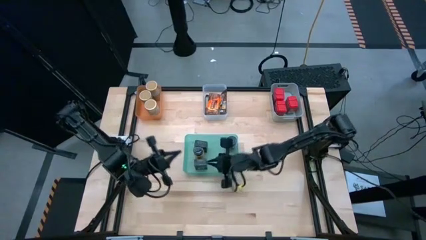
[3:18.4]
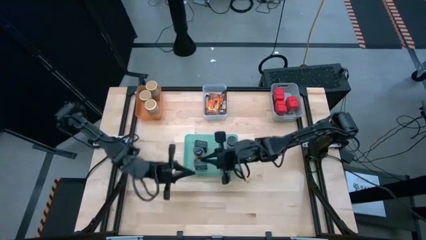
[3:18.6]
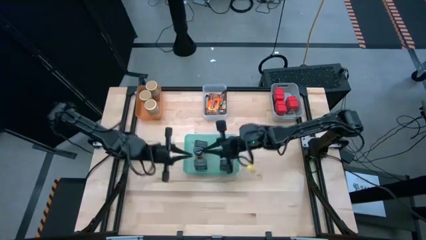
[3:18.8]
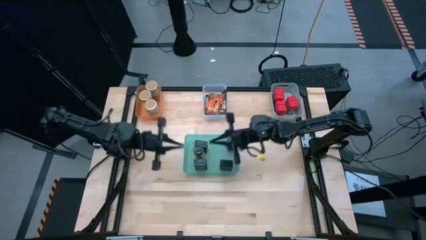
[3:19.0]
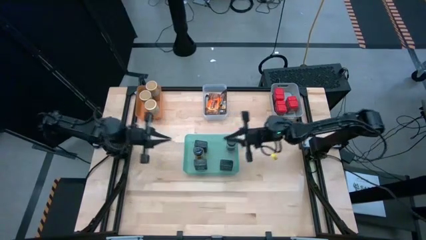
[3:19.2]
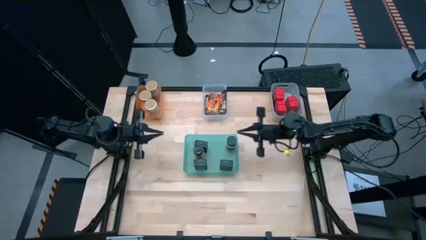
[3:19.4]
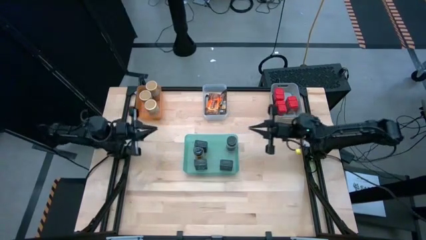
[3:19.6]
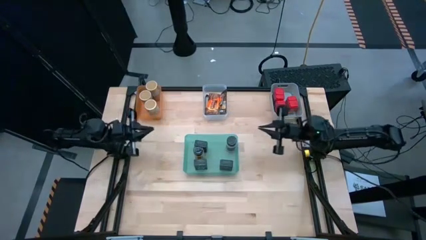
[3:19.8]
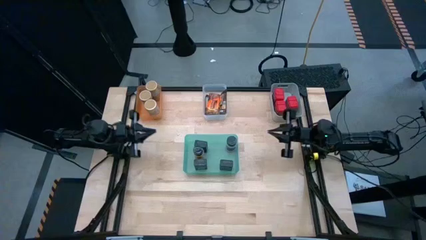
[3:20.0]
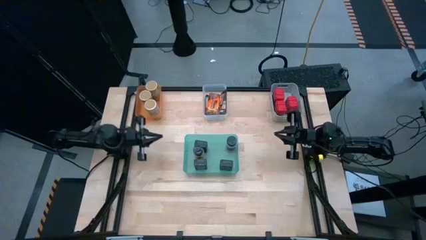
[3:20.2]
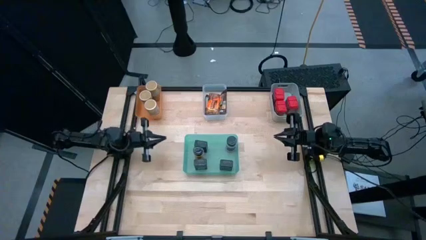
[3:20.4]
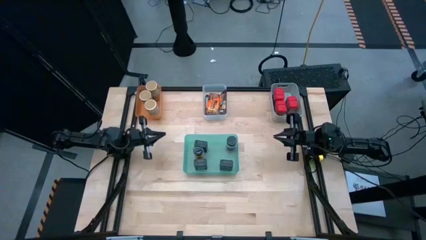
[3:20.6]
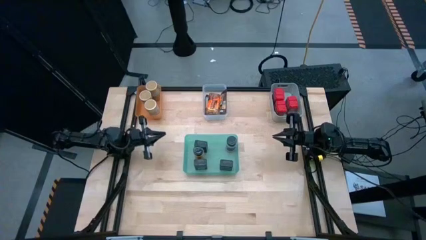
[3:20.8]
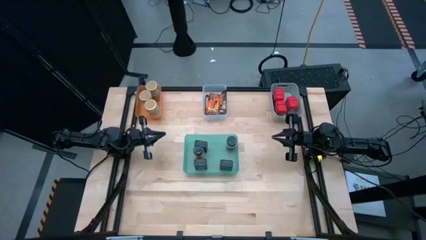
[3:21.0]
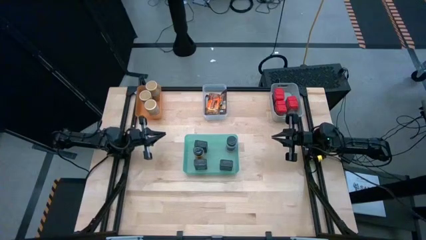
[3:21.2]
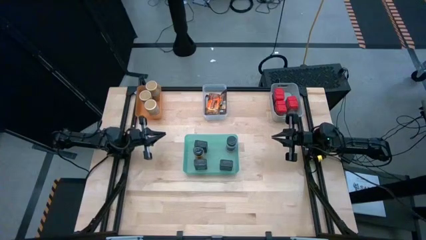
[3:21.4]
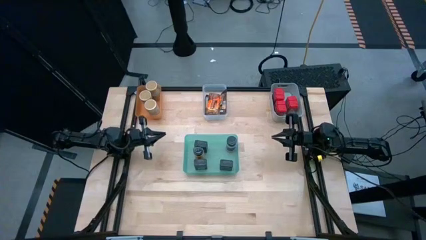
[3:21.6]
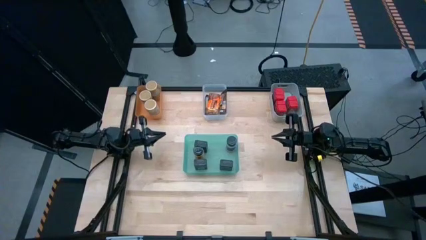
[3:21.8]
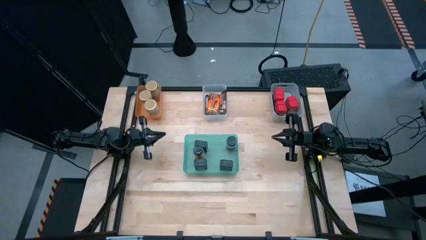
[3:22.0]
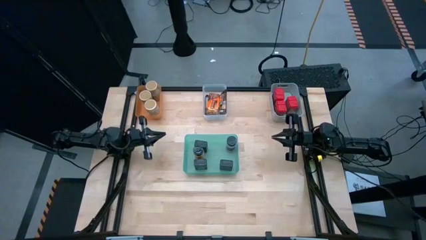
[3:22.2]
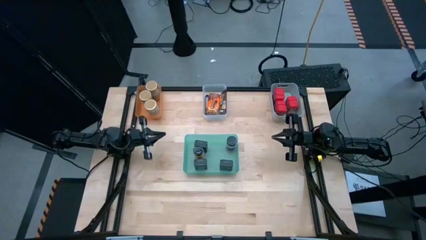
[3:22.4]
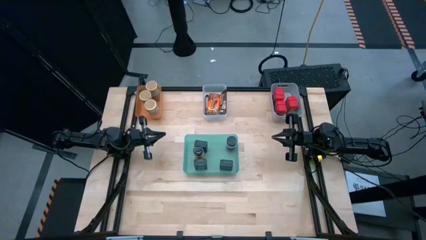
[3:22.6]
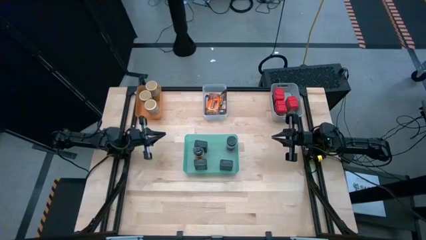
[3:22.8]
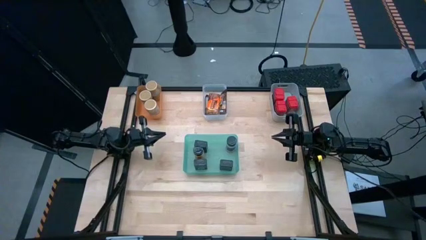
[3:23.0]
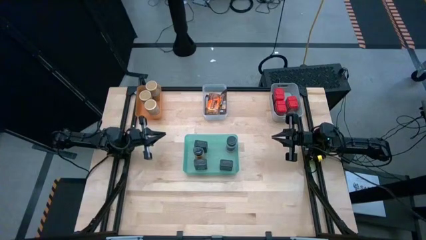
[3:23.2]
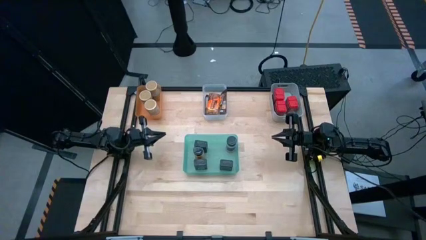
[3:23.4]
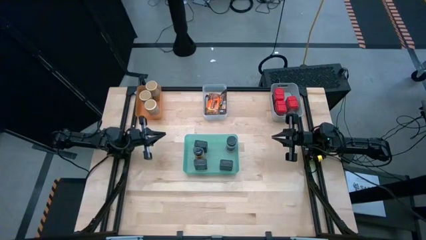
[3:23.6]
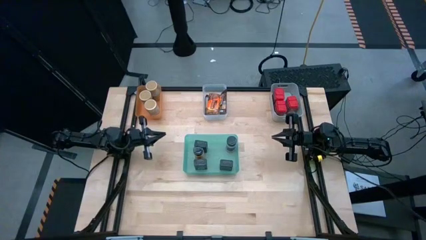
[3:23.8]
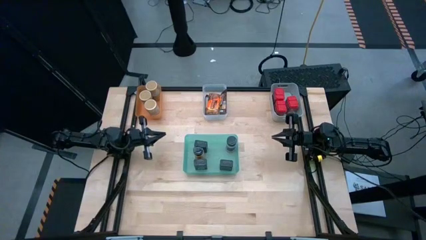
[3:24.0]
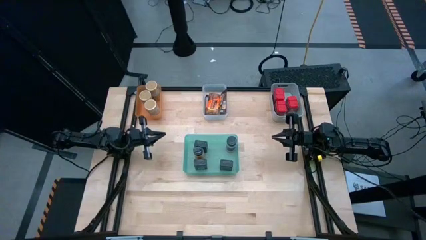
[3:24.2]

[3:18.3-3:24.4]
Task: Sort spices by type
Return to Home Position

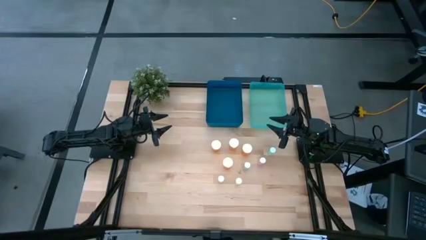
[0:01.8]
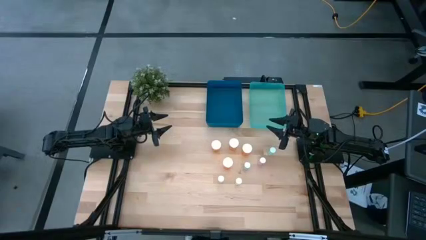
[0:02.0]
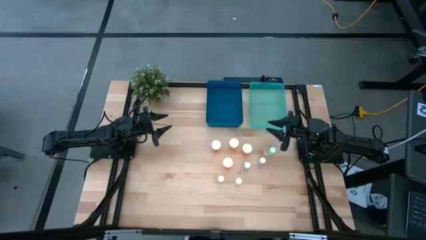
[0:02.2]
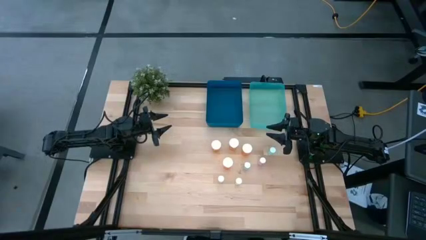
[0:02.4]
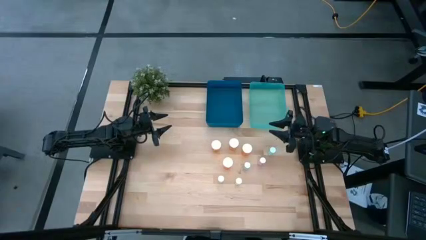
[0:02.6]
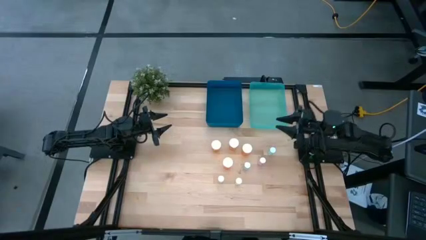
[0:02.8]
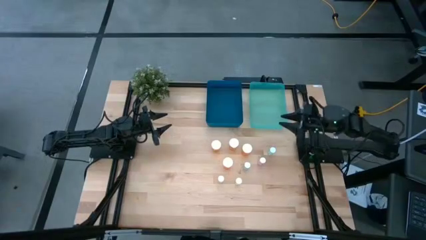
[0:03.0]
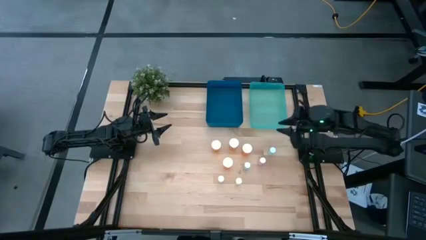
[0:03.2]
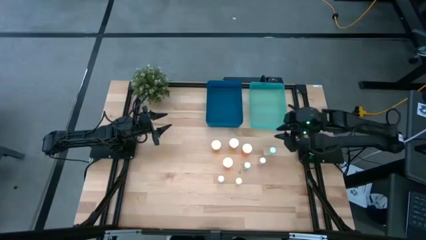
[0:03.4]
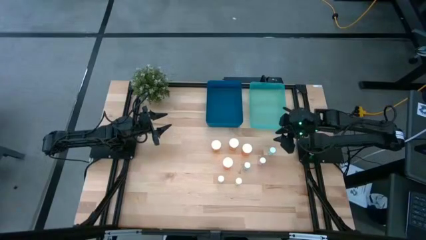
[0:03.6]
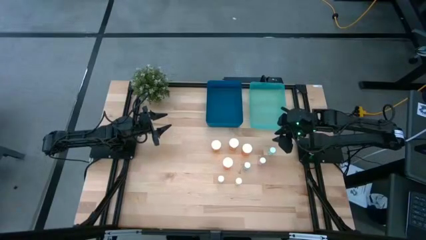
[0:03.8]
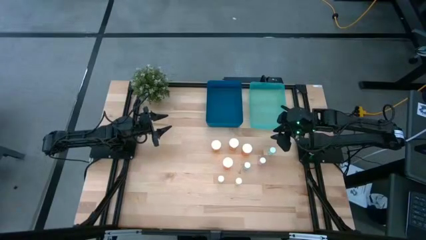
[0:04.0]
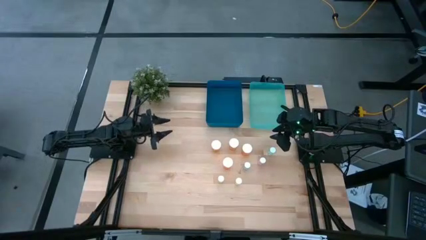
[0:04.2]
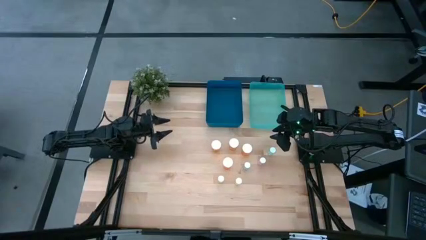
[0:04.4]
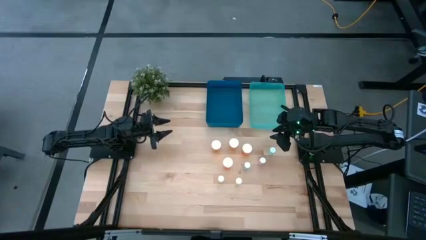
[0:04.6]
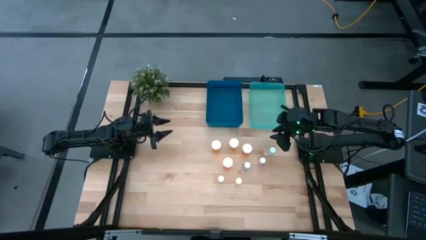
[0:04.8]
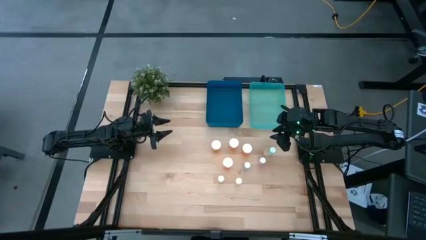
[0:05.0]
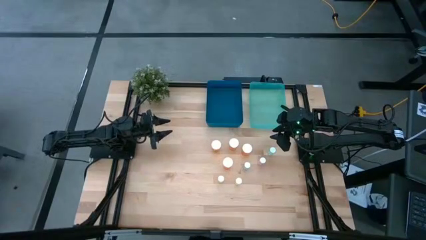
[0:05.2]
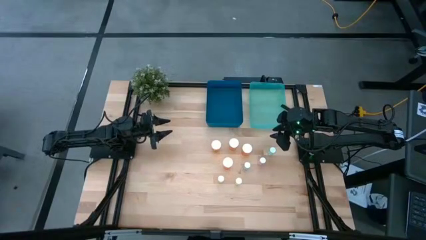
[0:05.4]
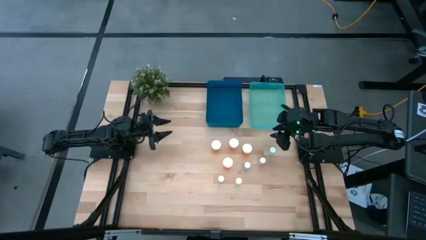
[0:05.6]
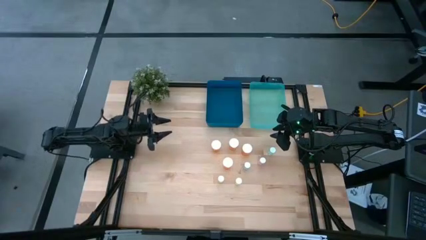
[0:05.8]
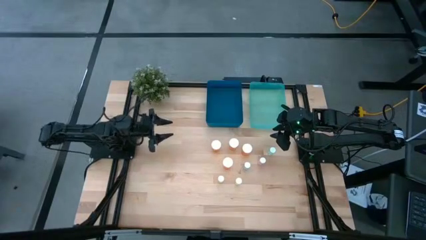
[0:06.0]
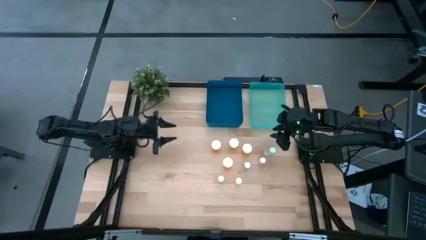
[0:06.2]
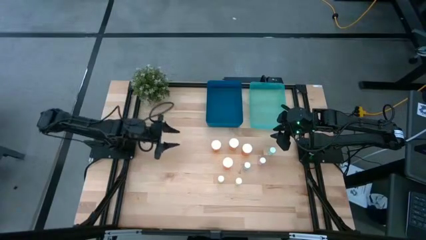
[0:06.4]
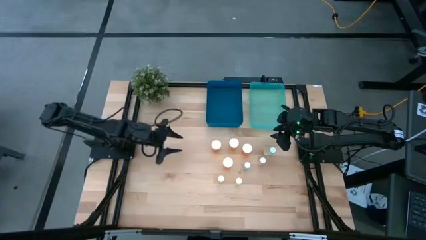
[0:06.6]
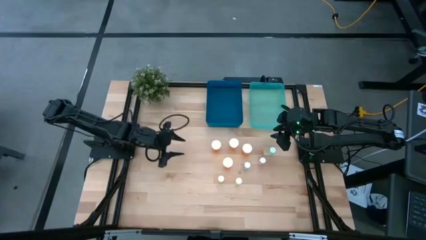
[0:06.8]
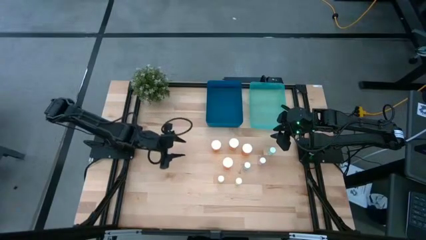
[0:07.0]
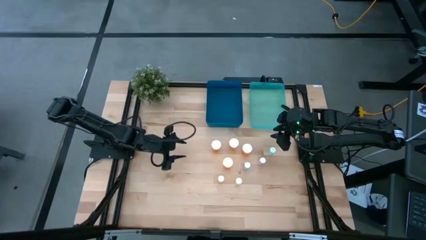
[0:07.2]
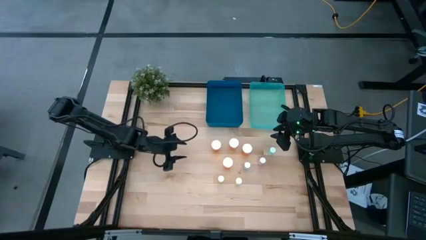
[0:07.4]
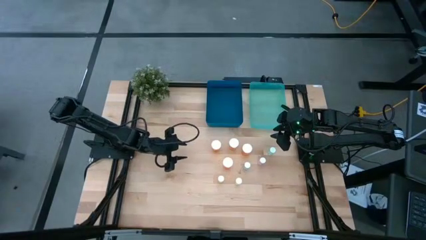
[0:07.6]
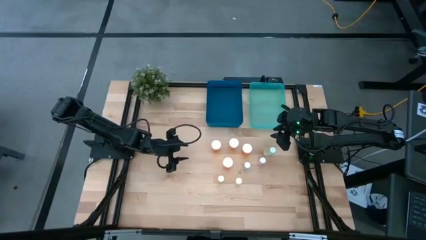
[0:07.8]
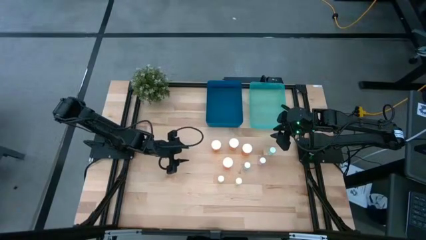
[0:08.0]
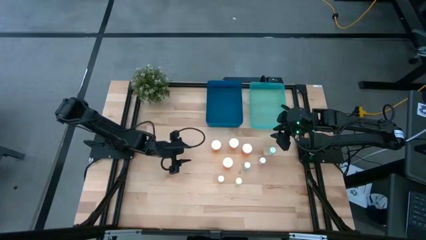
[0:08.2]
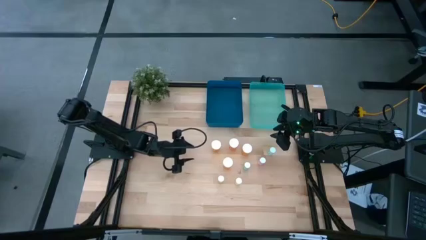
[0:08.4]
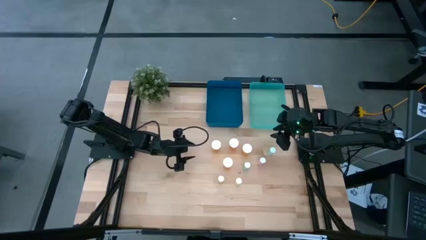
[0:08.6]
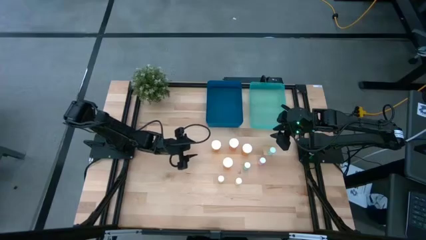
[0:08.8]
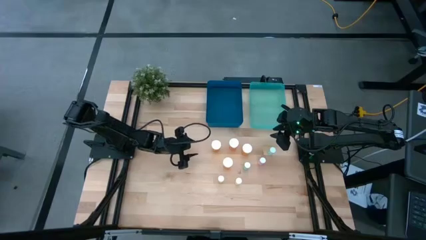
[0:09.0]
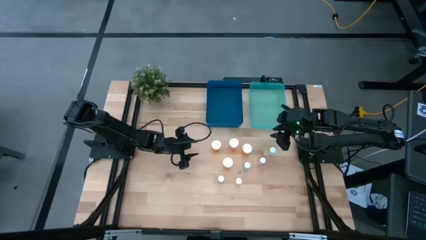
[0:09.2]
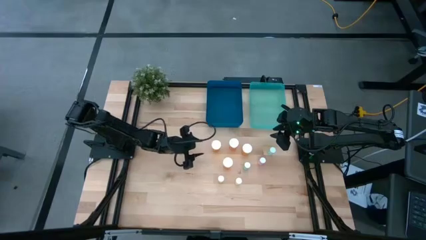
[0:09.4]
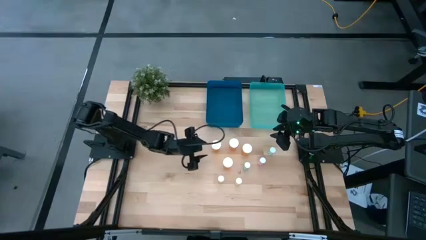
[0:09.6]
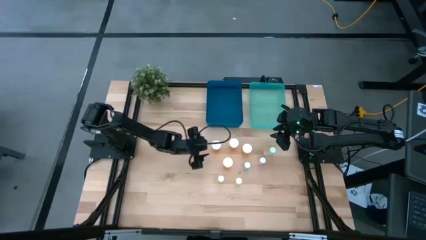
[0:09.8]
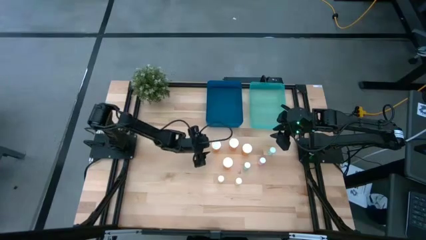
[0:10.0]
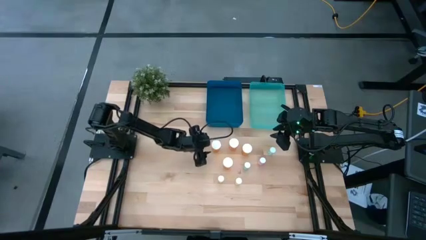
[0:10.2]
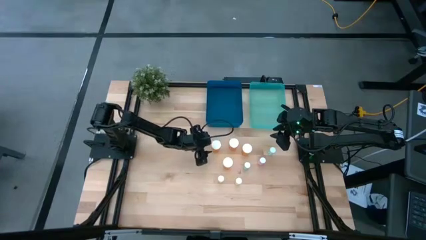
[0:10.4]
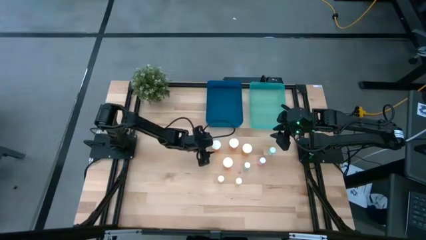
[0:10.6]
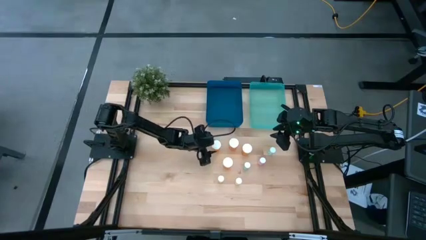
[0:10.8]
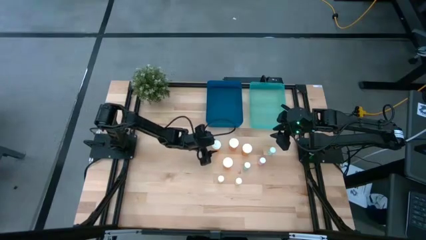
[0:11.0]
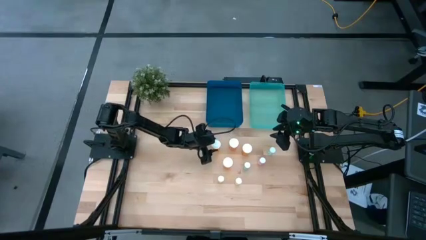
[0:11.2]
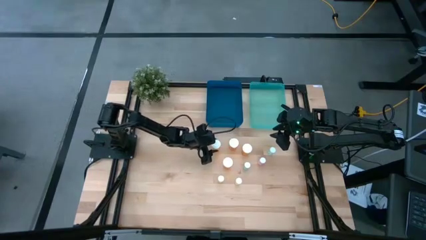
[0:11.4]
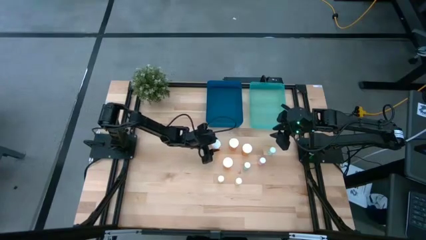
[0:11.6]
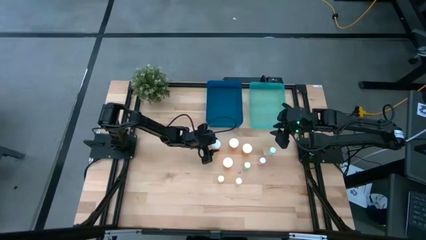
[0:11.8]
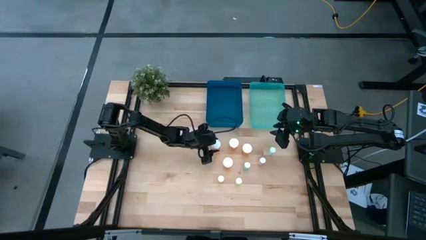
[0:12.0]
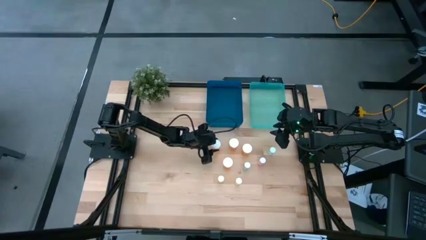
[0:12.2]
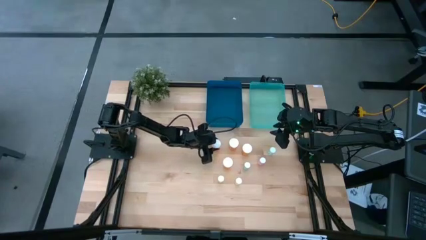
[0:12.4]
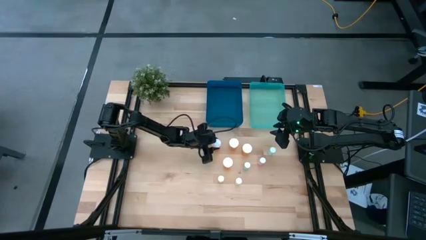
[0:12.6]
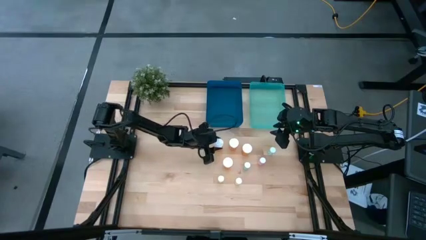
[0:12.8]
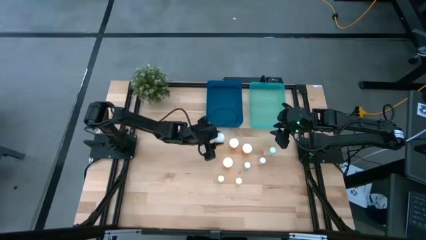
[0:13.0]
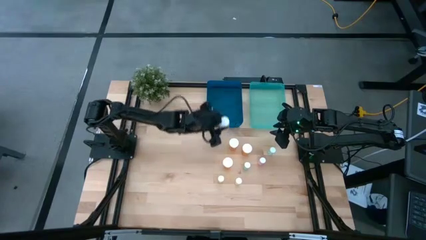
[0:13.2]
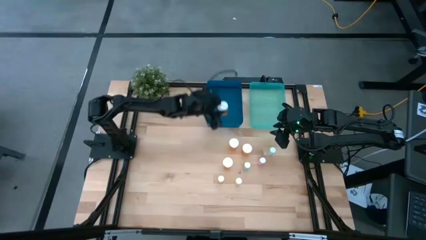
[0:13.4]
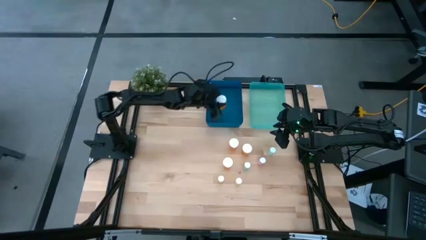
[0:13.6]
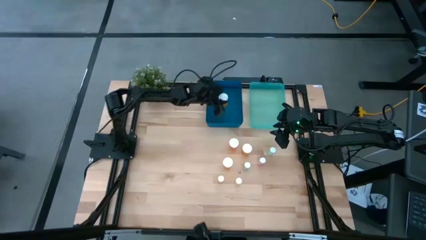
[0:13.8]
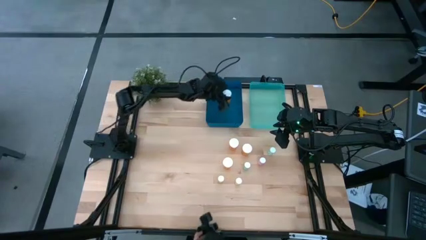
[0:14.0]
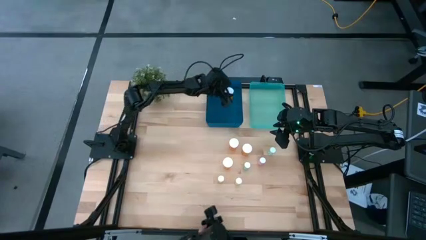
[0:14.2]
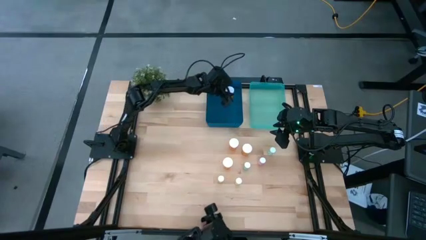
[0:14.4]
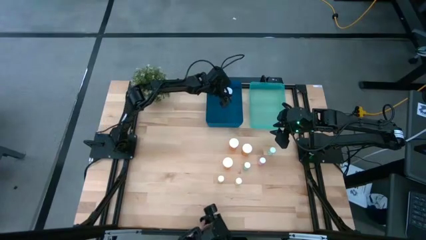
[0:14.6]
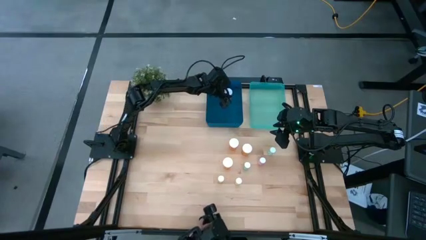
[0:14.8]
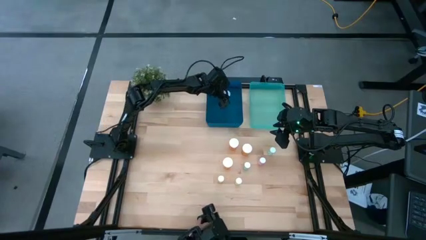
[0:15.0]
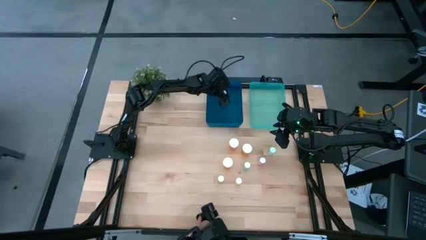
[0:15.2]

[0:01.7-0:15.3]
Task: Pick and place medicine bottles into bin by pill shape (circle, oval)
Put the large orange medicine bottle into the blue bin
